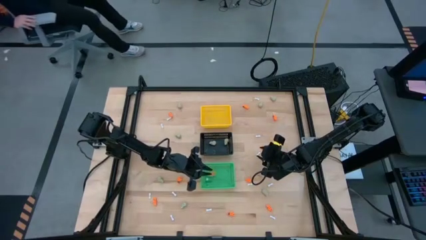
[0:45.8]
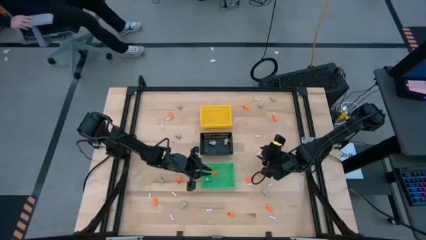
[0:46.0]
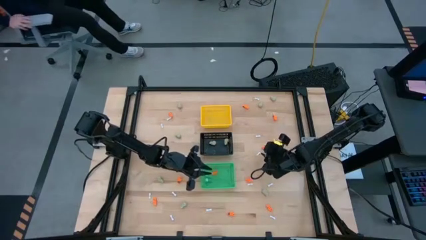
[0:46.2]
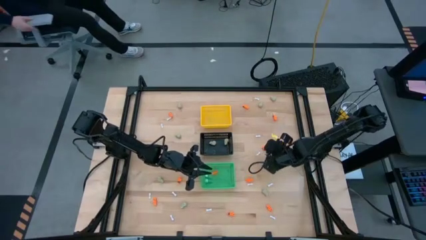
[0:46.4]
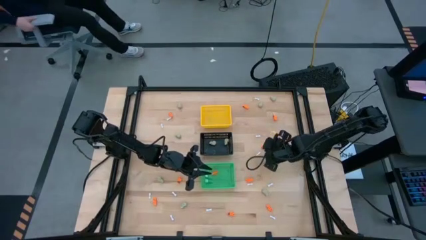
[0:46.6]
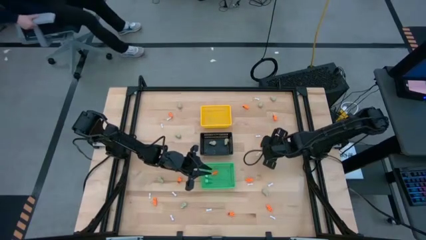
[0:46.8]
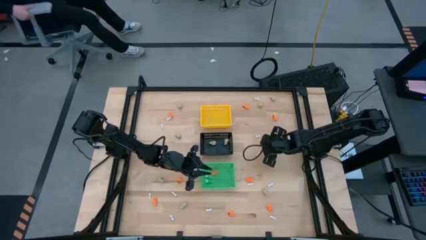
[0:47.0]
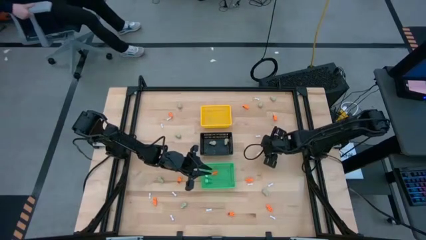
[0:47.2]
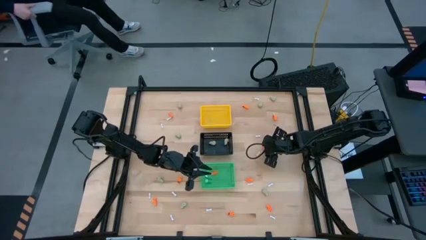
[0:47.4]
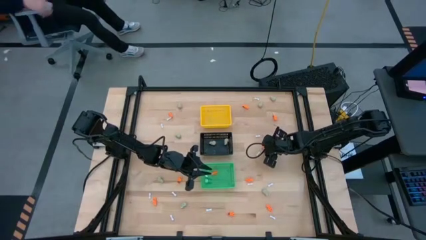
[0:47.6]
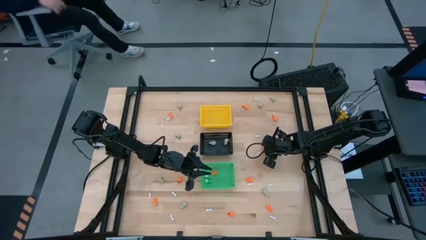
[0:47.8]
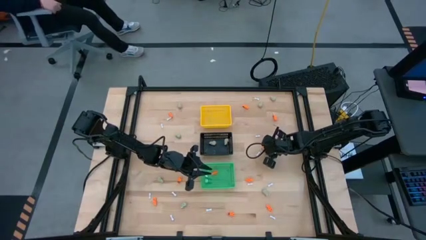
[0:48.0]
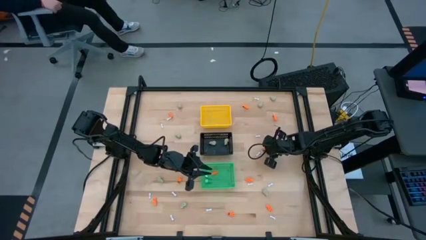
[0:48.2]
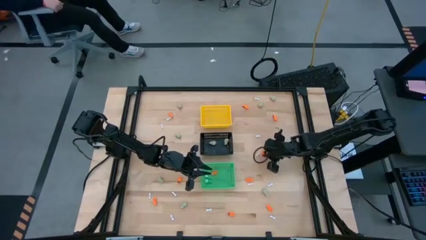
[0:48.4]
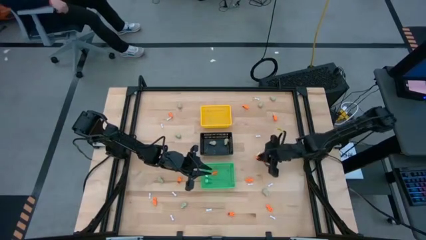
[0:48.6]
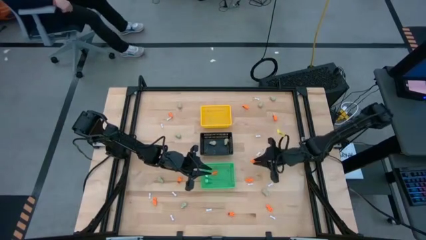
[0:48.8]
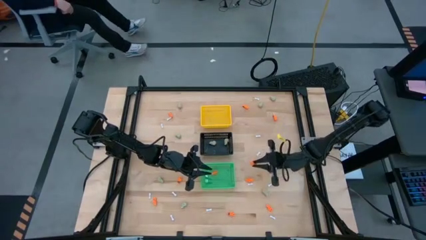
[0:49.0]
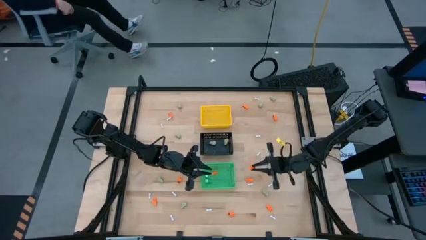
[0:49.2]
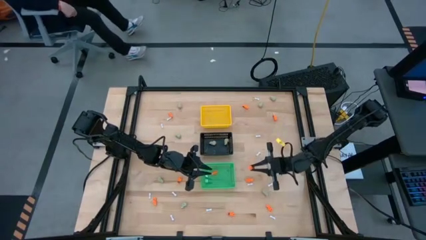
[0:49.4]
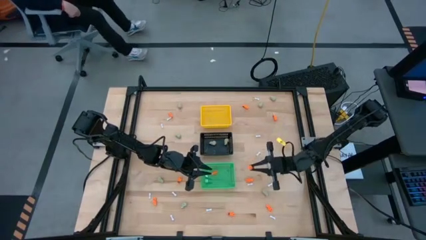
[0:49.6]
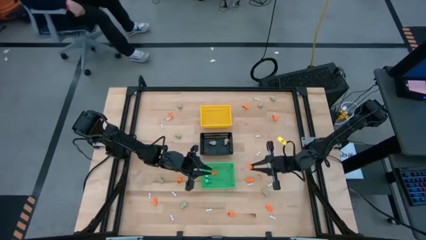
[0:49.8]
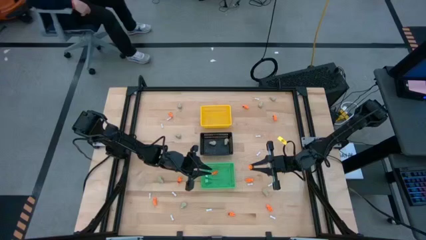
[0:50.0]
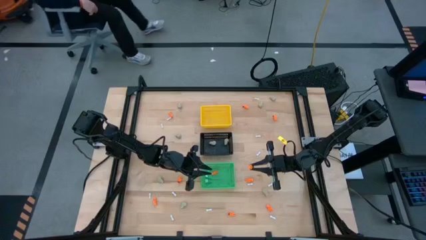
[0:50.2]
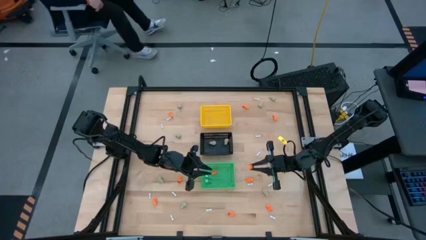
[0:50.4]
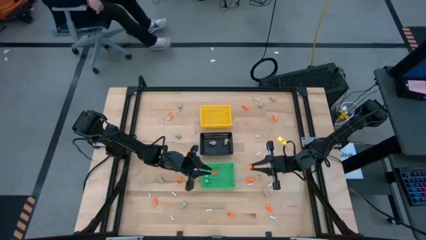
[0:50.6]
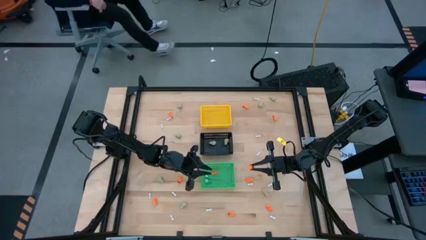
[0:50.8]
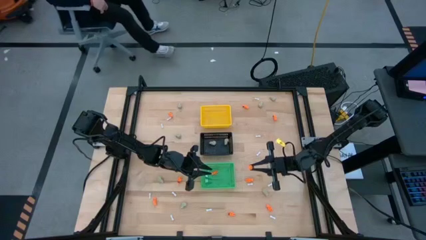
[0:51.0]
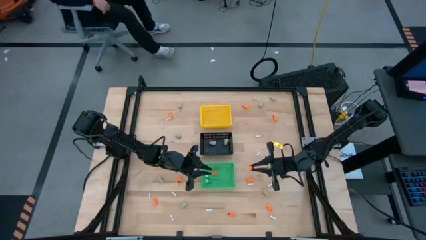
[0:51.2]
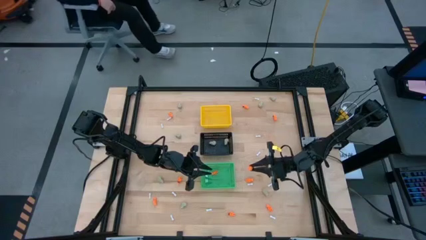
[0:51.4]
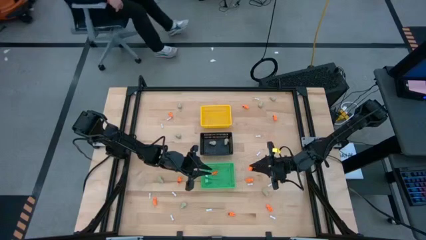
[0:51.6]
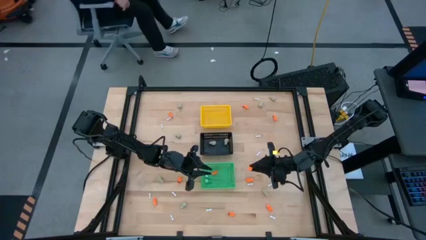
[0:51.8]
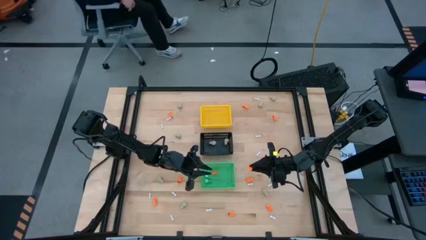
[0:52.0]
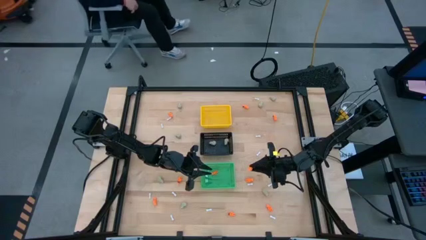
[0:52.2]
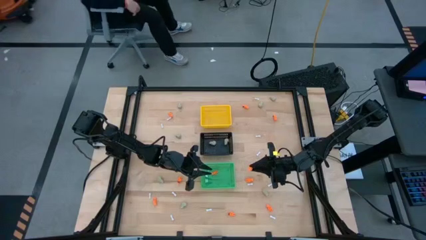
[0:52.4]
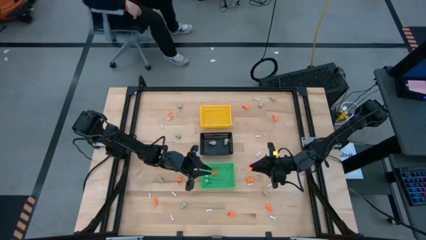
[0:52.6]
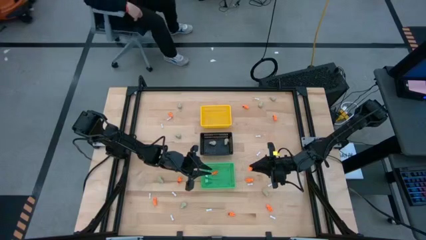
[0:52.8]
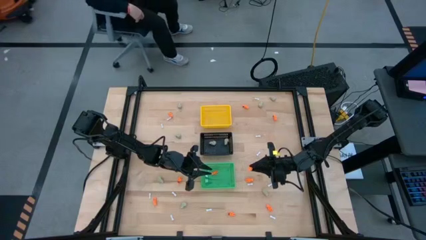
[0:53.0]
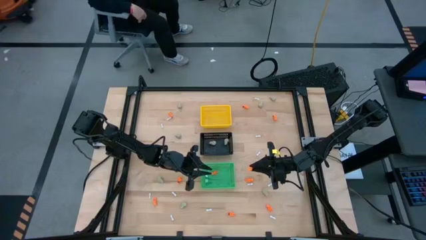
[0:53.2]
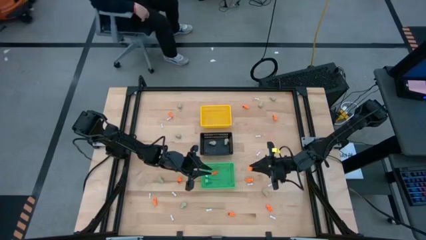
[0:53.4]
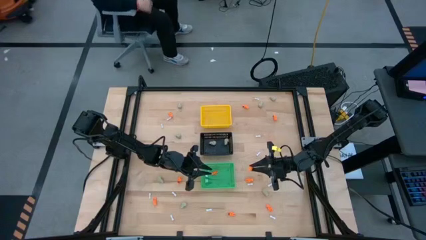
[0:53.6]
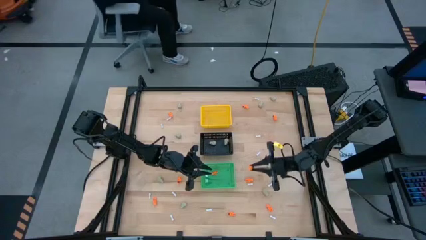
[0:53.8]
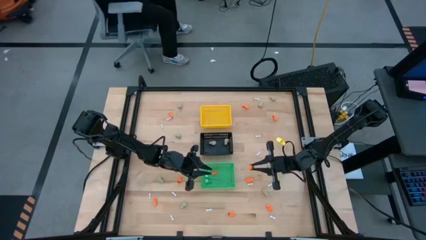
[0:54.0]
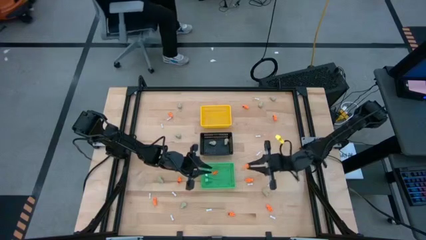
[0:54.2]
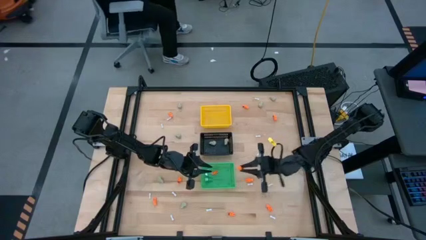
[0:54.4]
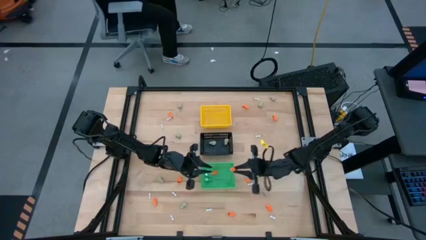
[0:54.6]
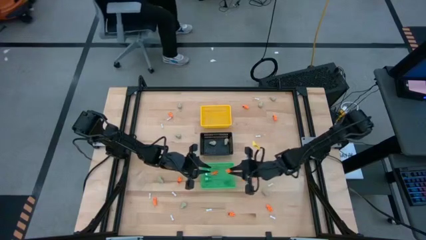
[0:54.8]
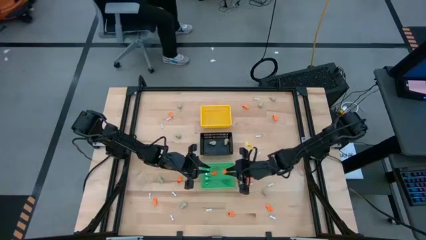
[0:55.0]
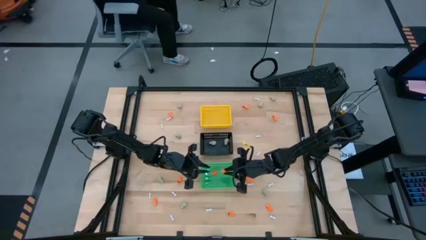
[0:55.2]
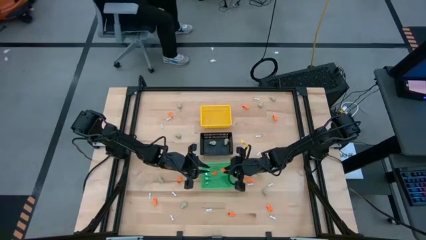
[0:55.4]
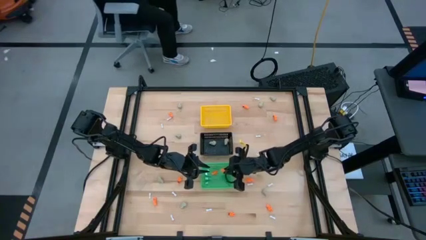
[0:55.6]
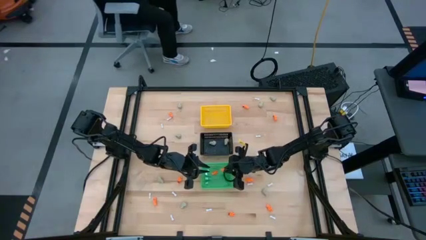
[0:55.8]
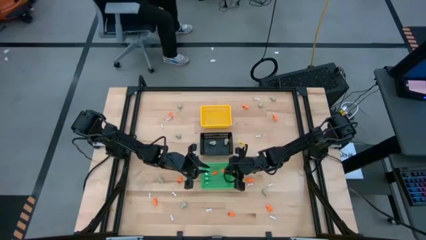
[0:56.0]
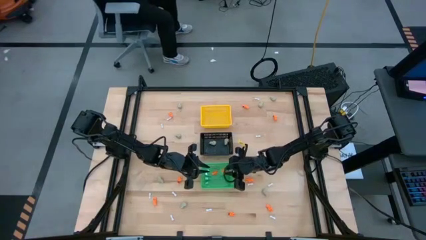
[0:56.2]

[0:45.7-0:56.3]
Task: Sort Halloween decoration
Put the orange skeleton toy into the green basket
